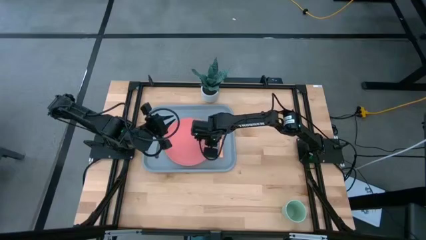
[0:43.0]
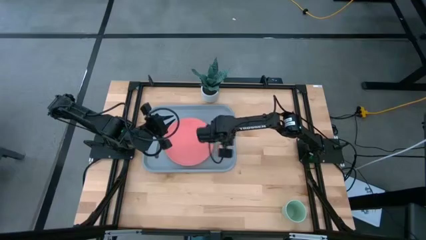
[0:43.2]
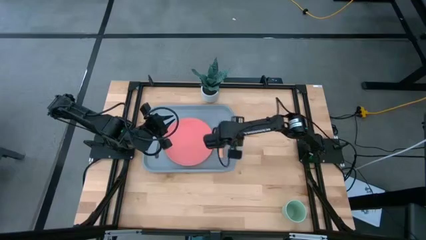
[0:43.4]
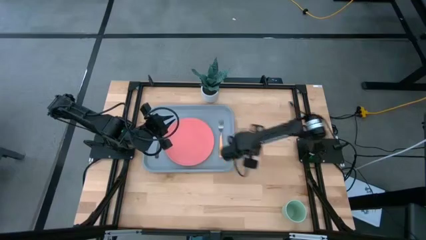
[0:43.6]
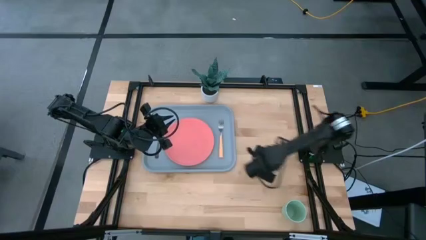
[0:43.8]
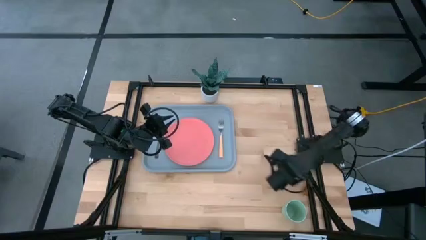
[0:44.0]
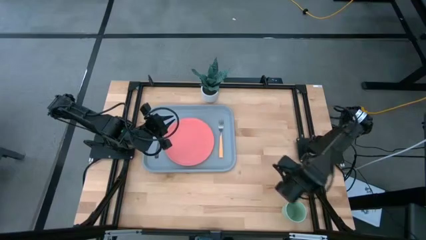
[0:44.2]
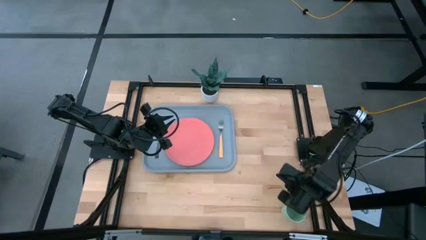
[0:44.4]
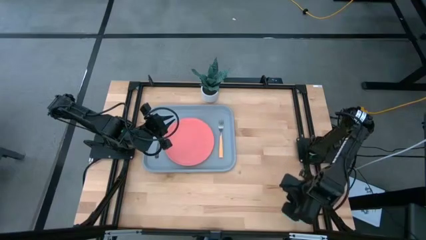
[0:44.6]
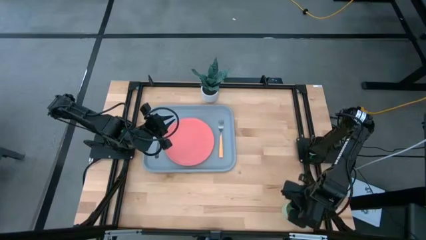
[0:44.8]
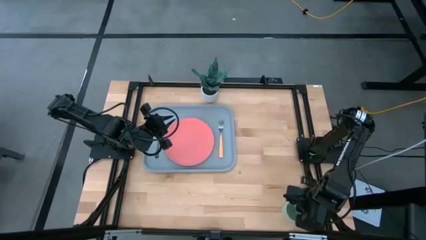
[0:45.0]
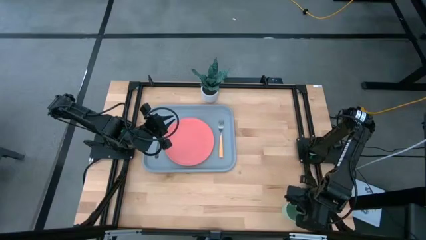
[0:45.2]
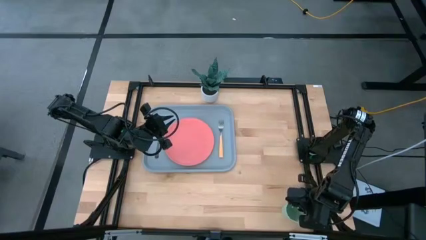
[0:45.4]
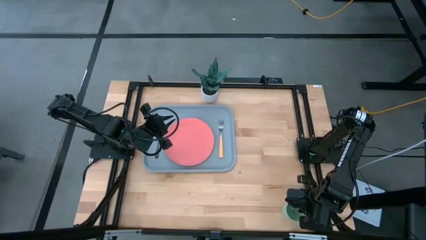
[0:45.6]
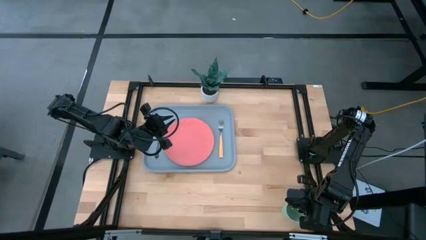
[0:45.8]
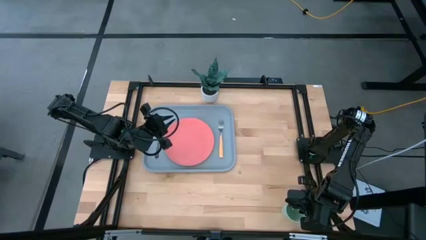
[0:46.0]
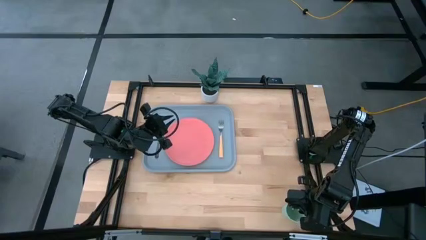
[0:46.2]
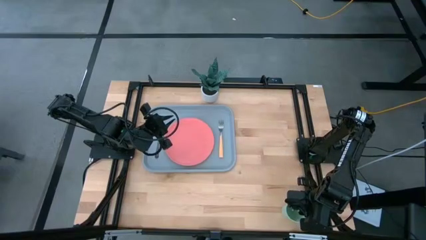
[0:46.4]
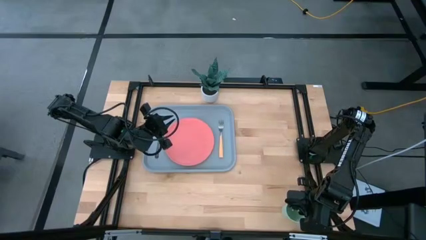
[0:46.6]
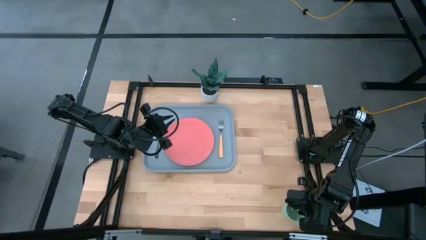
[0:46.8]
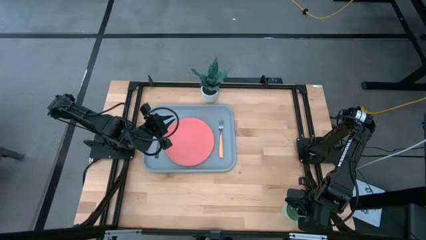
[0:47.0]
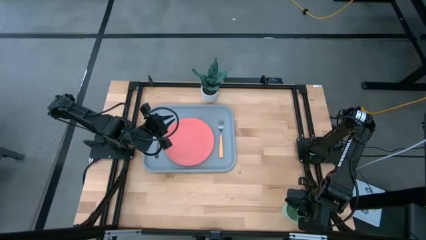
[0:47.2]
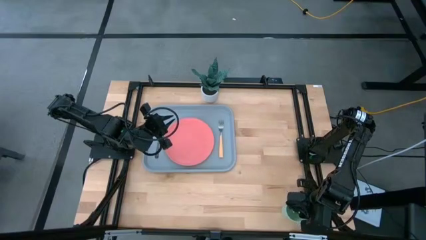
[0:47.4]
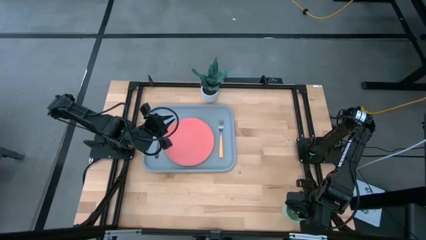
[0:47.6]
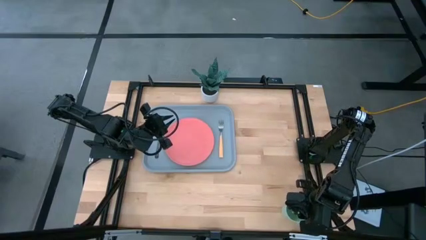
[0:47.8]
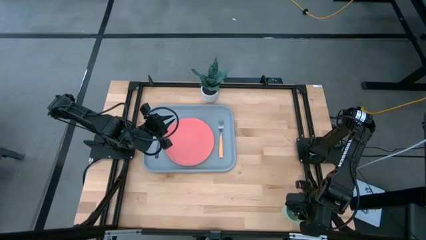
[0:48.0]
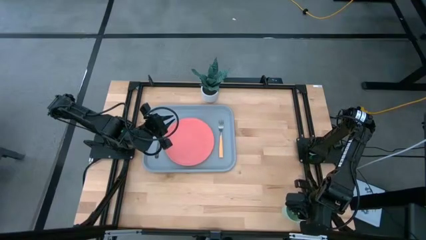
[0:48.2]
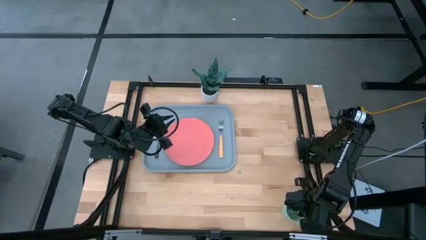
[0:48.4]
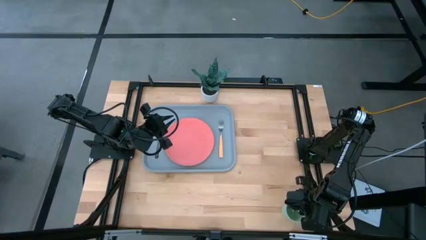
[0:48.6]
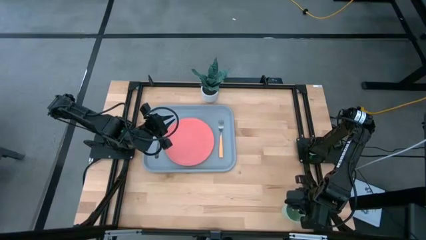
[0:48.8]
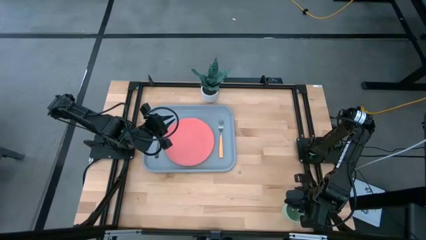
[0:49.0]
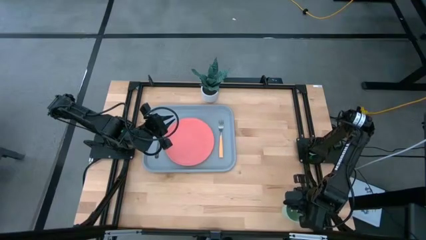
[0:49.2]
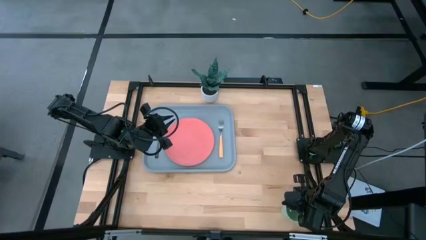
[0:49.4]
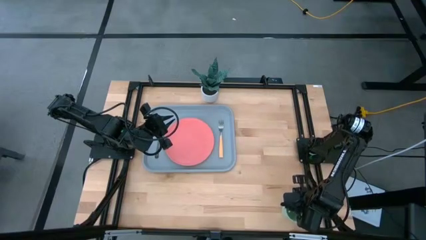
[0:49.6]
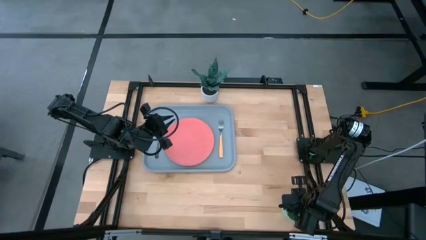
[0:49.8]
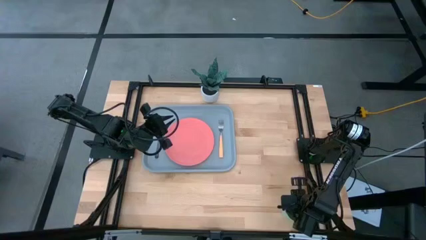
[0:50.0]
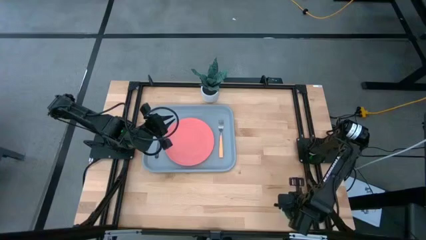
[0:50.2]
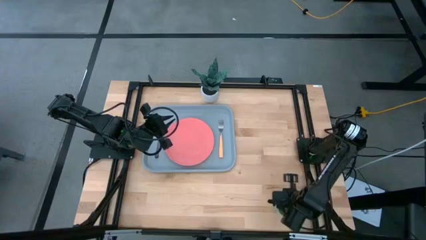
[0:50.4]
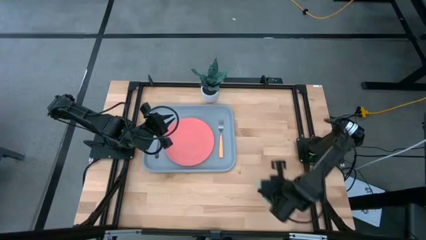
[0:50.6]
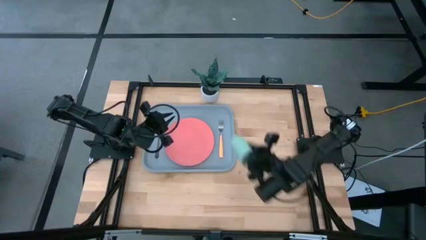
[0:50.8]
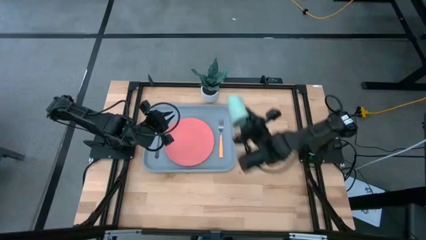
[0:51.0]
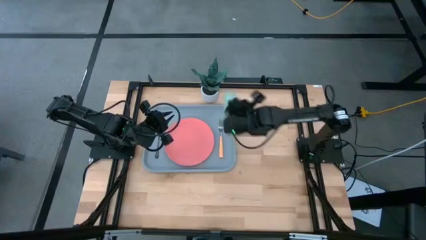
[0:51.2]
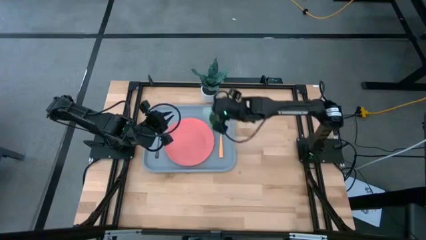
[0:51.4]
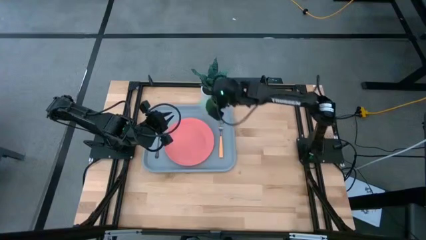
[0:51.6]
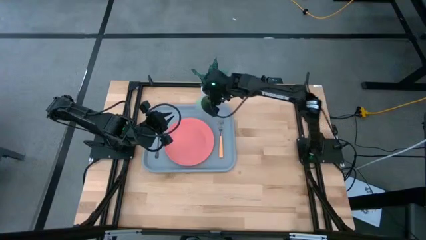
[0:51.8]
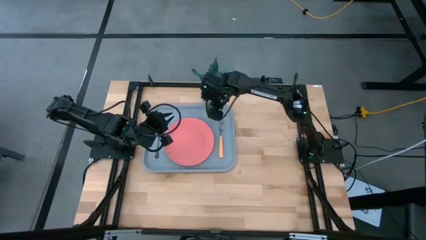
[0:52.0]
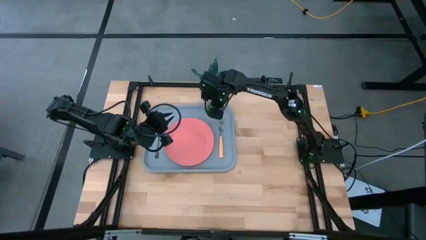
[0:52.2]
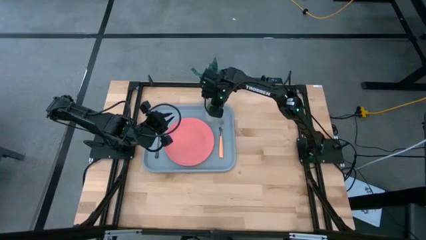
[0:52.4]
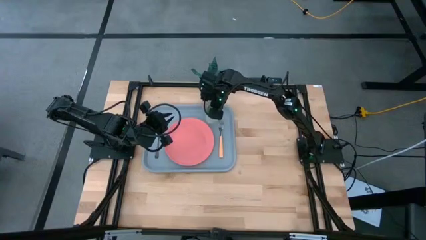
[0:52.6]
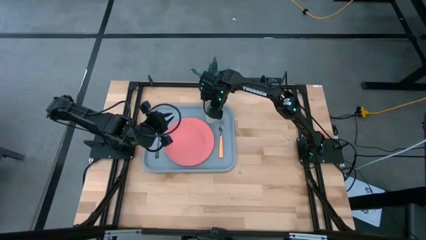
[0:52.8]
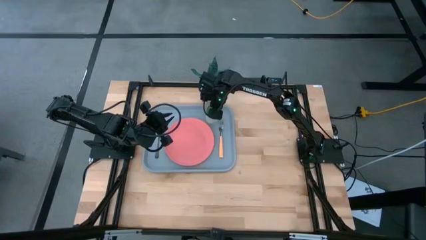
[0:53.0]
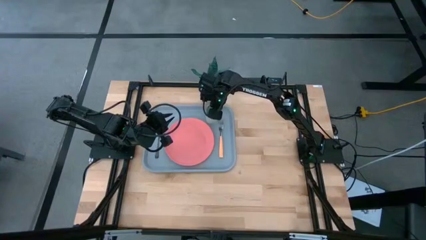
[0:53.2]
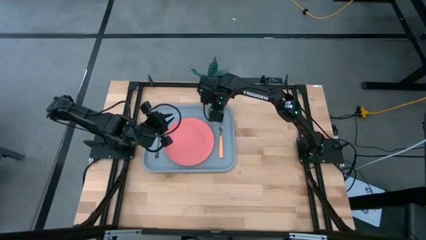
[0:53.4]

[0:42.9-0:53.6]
Task: Pick and place plate/cup/fork/spoon on tray
Put the green cup on the blue tray above the plate

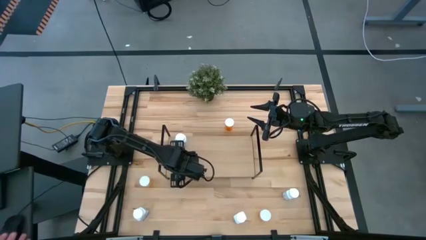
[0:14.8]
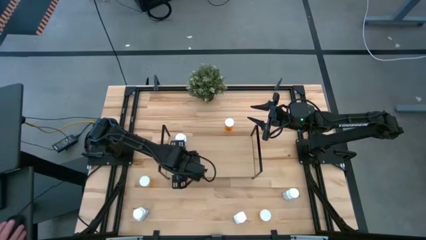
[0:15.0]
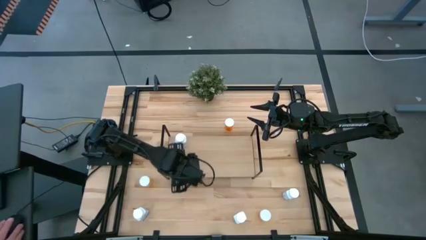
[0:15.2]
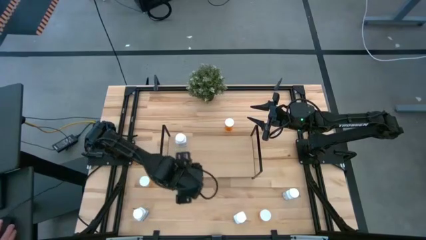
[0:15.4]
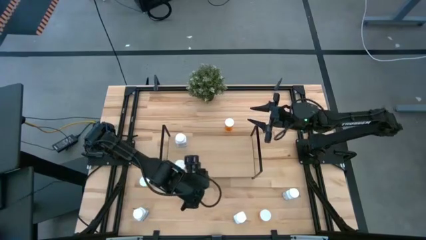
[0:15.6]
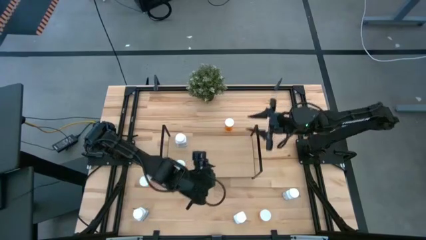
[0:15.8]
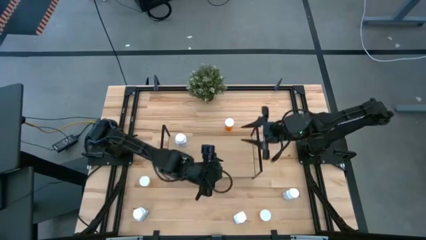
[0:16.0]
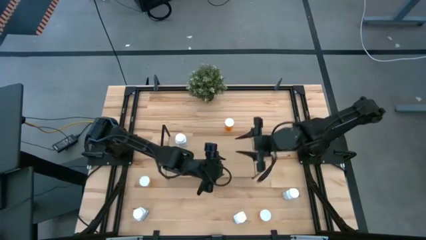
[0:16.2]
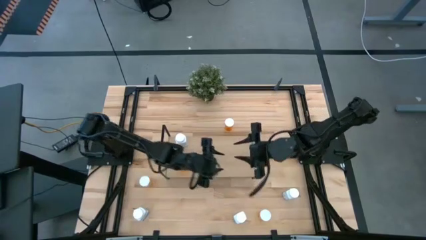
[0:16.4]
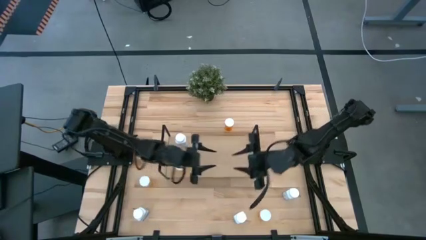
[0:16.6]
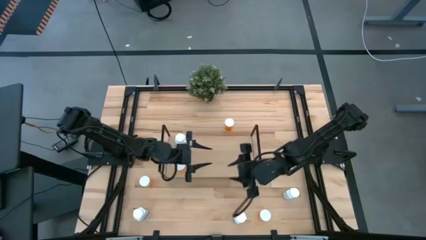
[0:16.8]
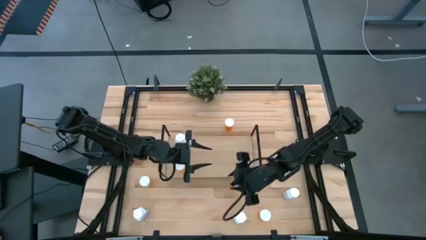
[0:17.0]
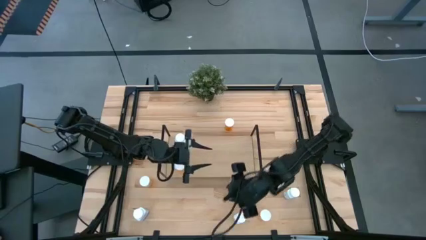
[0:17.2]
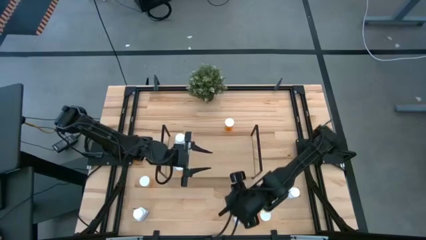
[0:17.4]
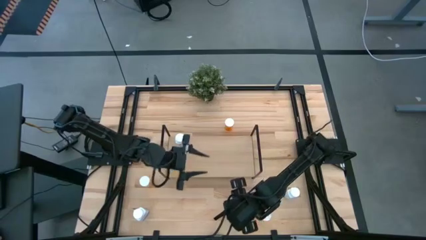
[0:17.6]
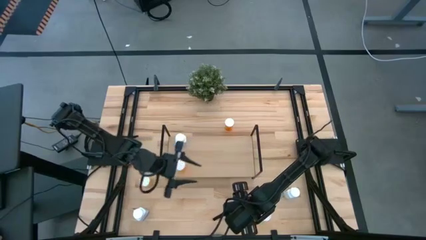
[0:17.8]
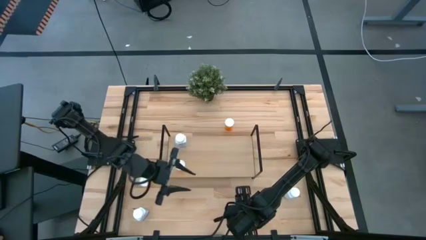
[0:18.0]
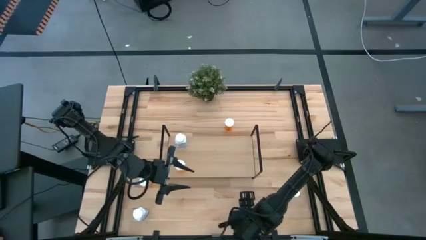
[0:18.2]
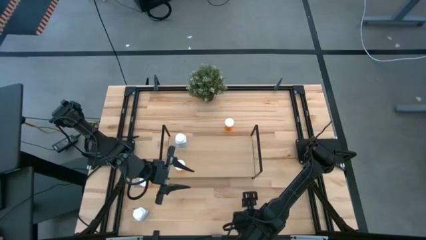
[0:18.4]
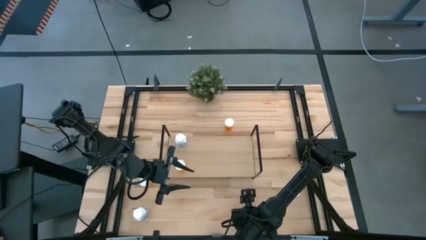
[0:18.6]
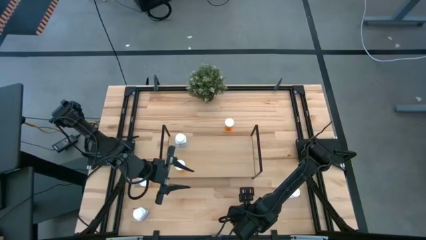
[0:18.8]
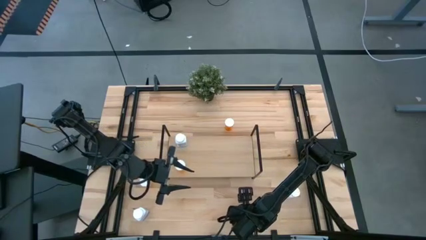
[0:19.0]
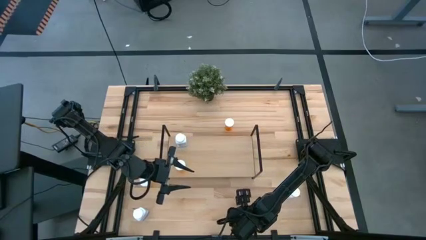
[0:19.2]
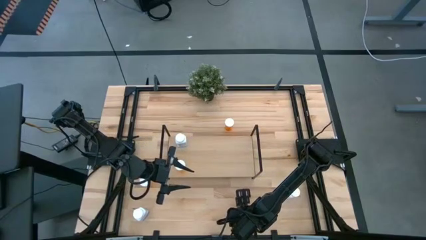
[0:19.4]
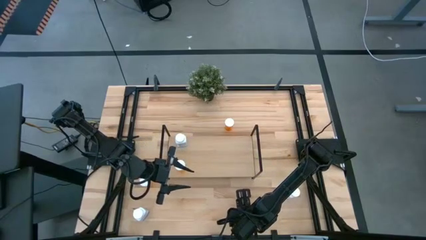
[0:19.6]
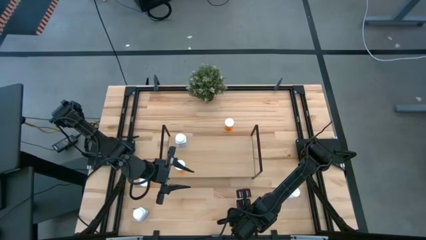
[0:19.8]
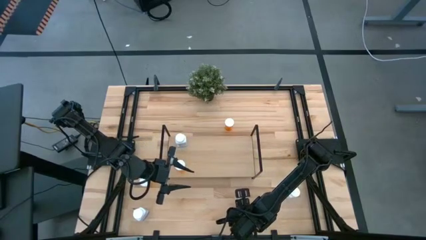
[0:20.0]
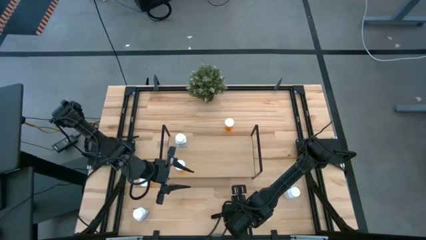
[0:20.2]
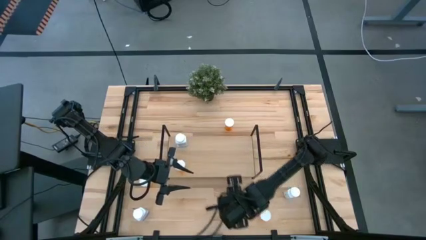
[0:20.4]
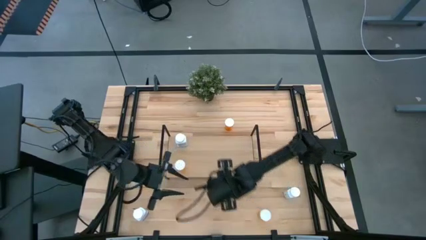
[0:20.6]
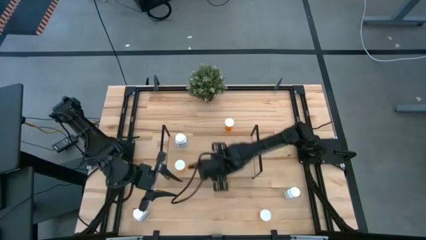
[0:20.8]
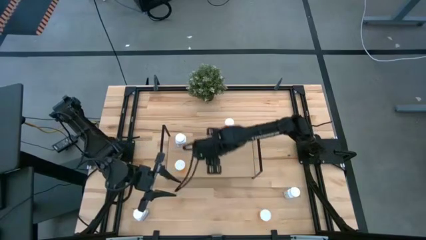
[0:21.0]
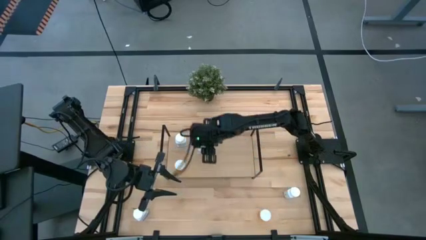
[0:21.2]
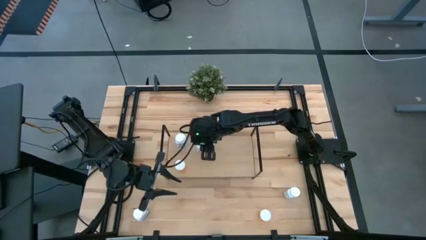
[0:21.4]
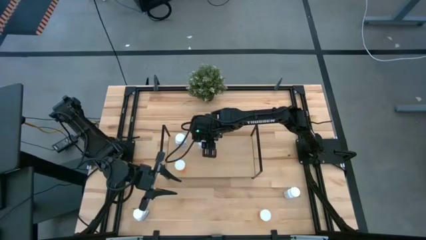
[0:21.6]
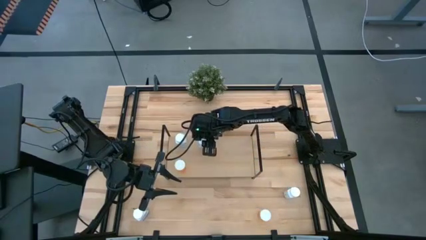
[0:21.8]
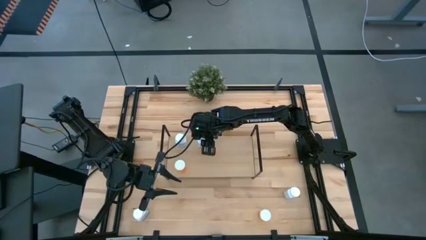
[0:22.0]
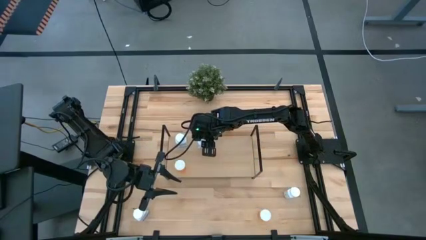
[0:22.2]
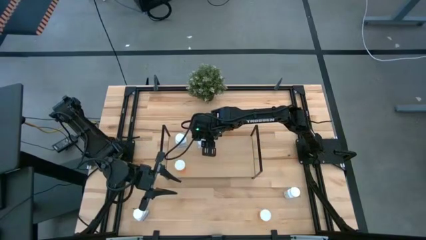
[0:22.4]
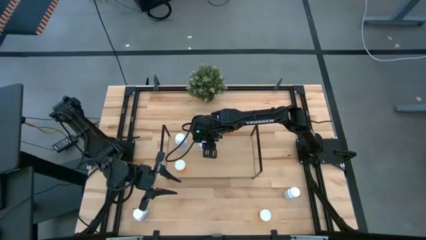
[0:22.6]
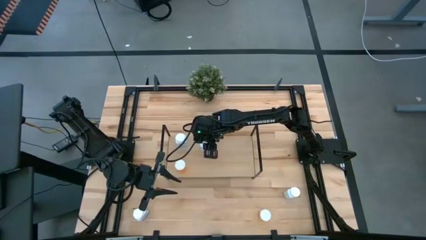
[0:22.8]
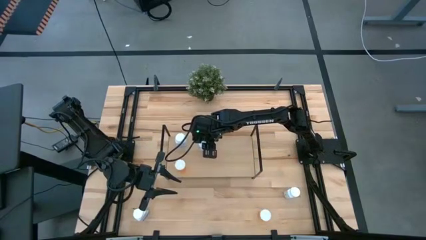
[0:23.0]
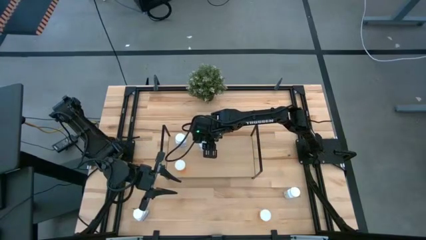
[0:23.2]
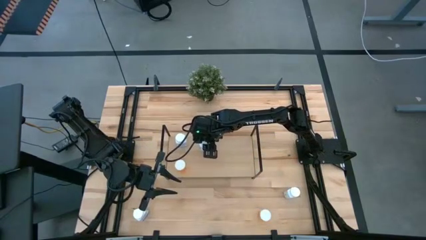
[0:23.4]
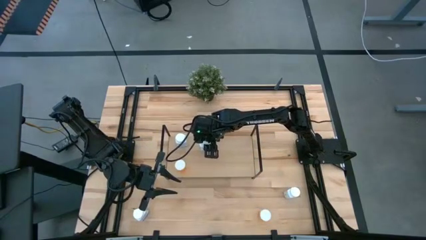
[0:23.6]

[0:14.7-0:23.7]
Task: Pick and place medicine bottles onto shelf by color
Put the bottom center white pill bottle on the shelf
